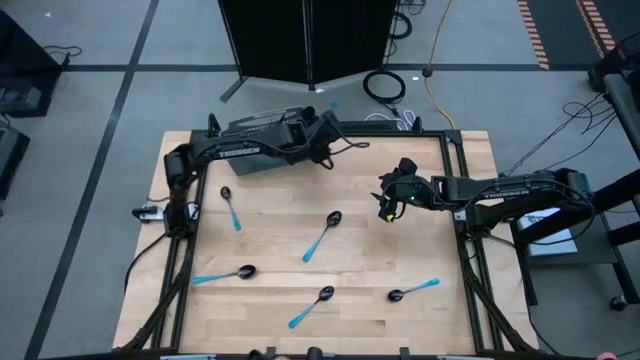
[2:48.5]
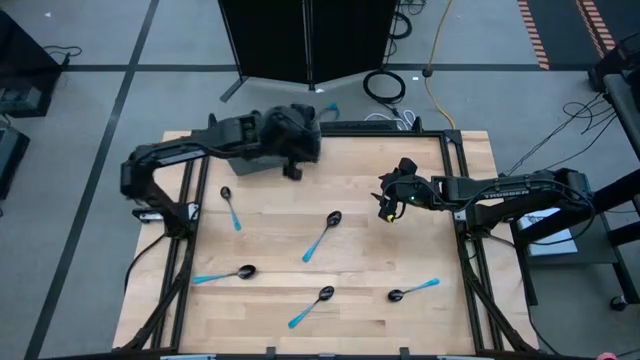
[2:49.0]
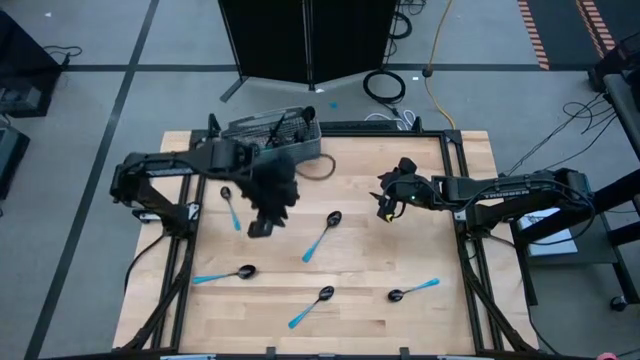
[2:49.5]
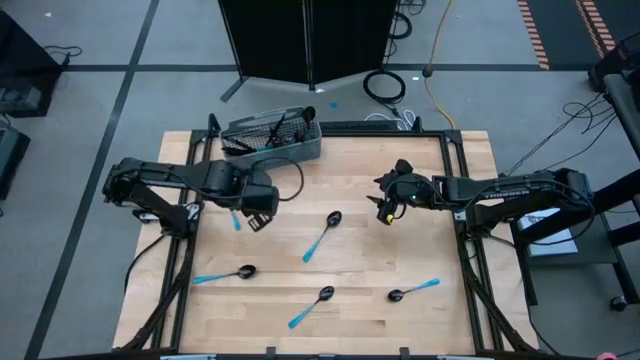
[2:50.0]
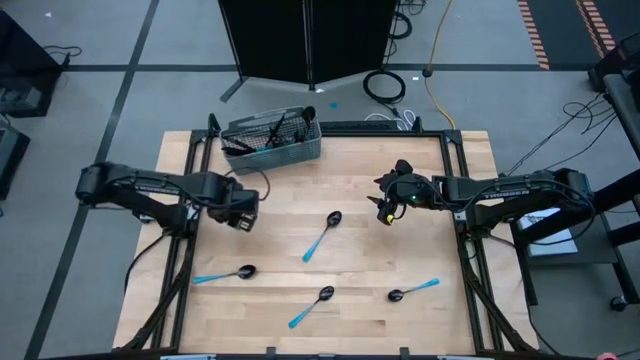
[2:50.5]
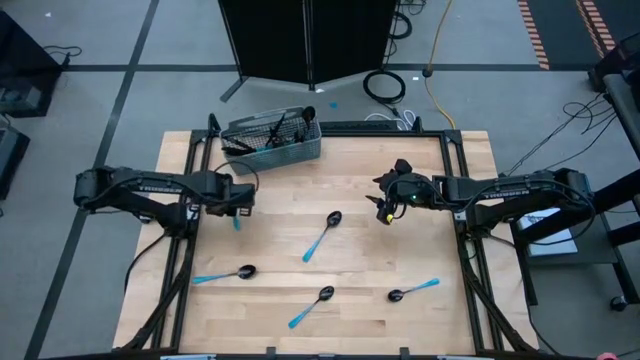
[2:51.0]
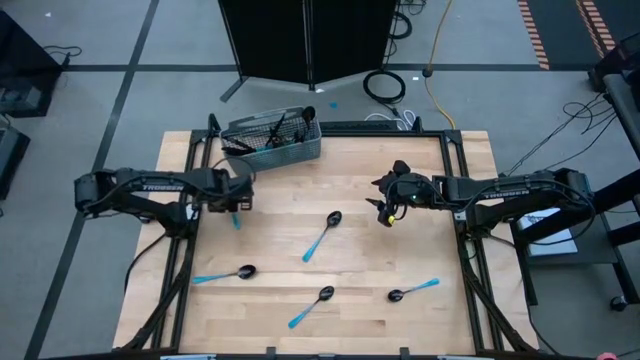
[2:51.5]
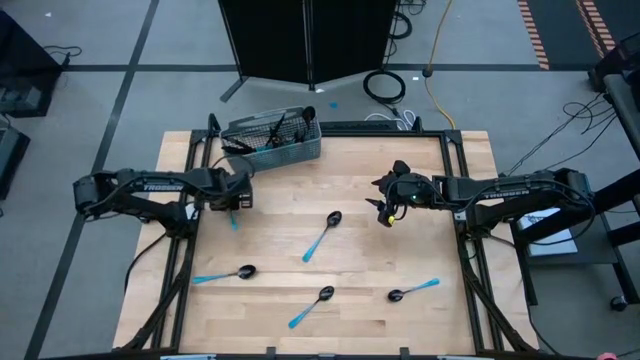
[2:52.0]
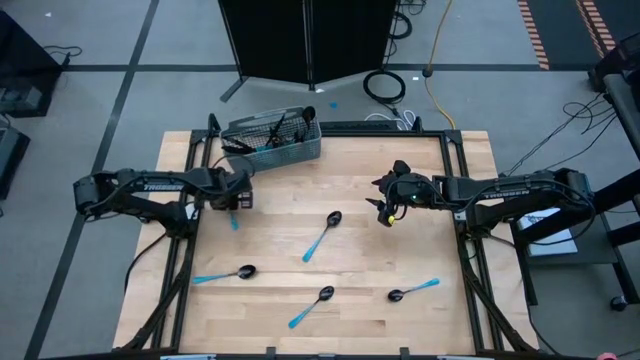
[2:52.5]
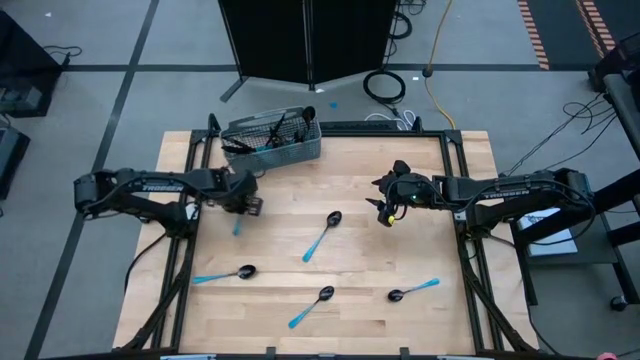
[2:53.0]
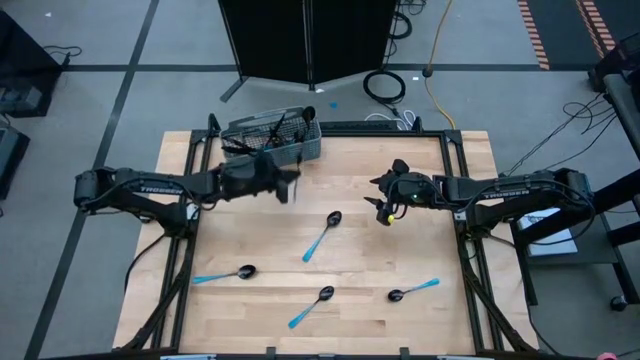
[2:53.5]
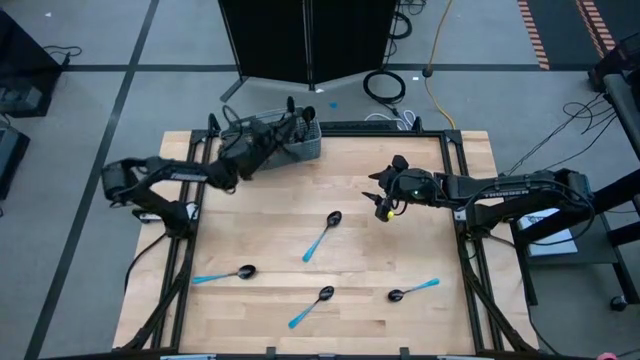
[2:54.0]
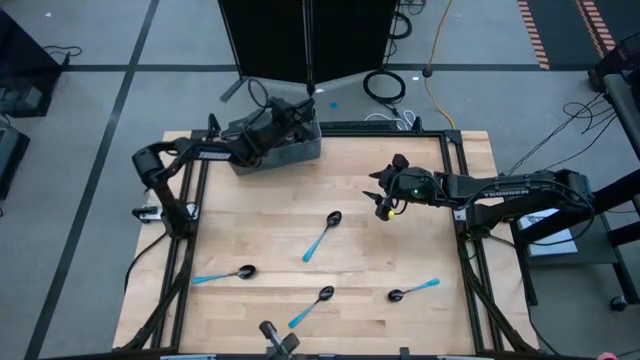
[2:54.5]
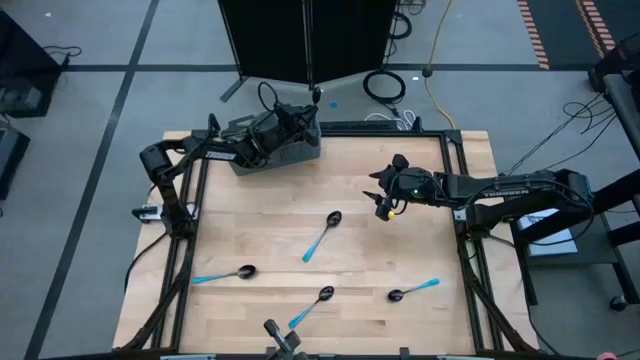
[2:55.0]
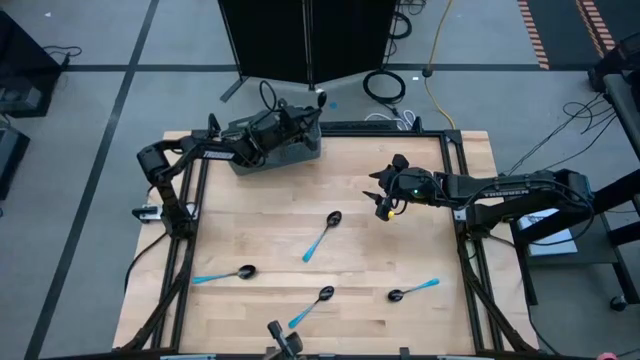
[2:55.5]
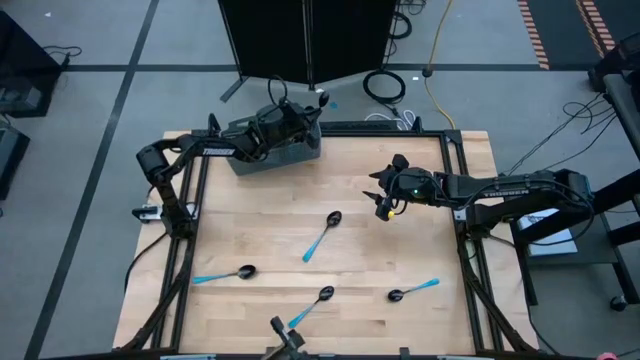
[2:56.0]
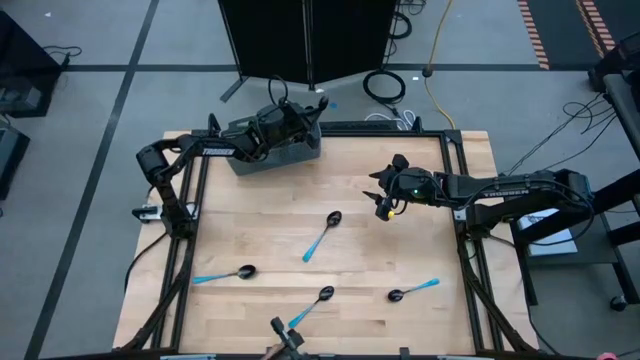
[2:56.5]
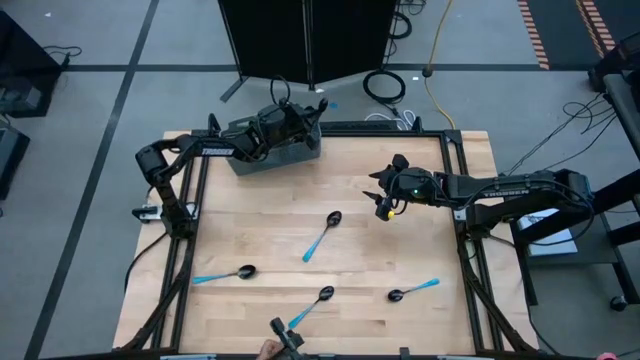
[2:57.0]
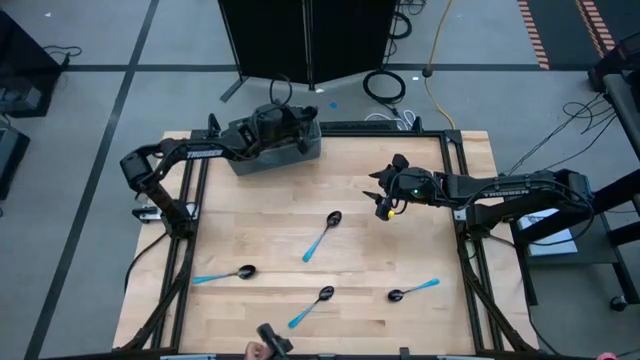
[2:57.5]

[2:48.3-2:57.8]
Task: Sort silverware
Put the blue spoon into the silverware basket

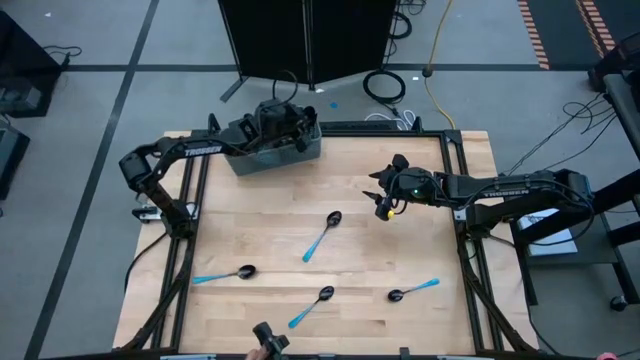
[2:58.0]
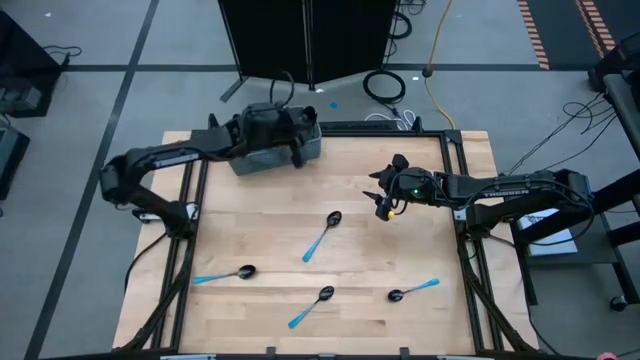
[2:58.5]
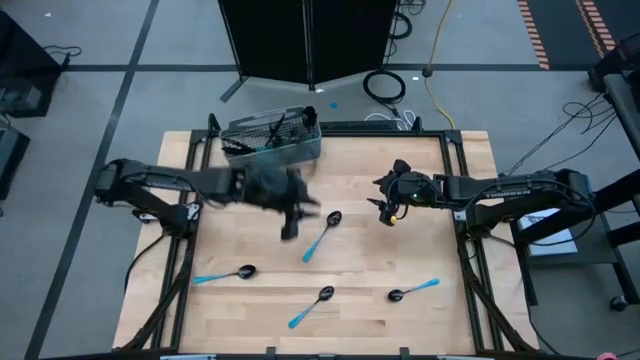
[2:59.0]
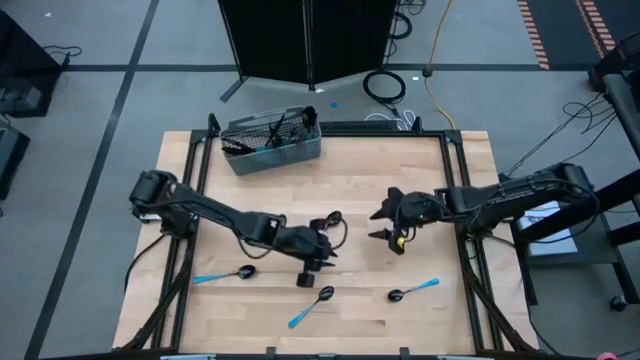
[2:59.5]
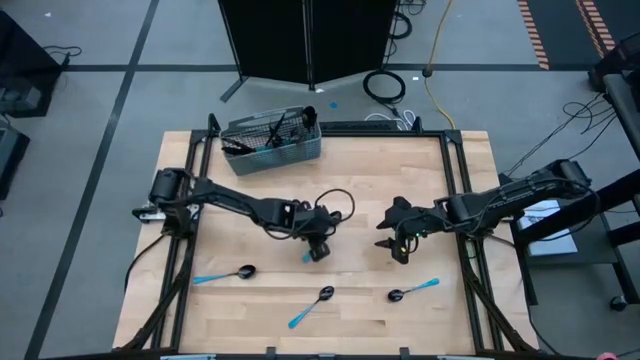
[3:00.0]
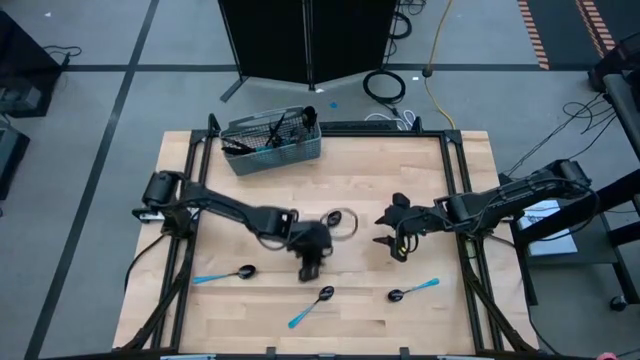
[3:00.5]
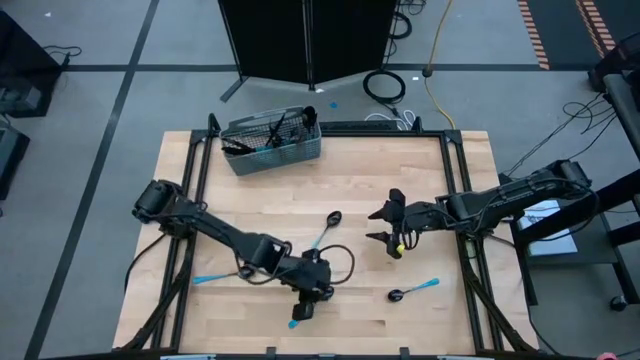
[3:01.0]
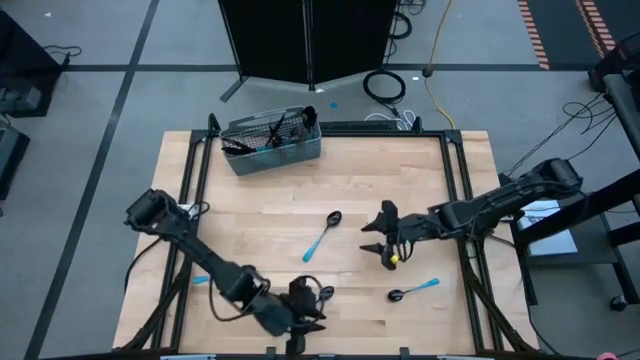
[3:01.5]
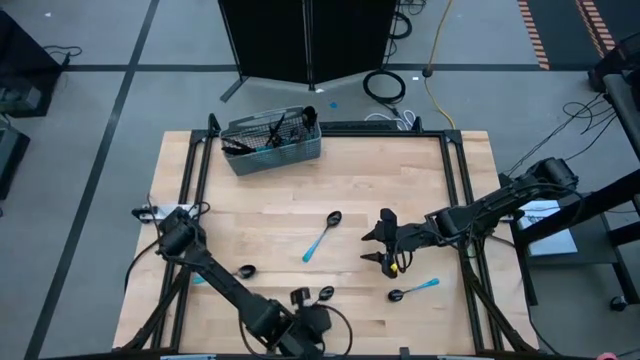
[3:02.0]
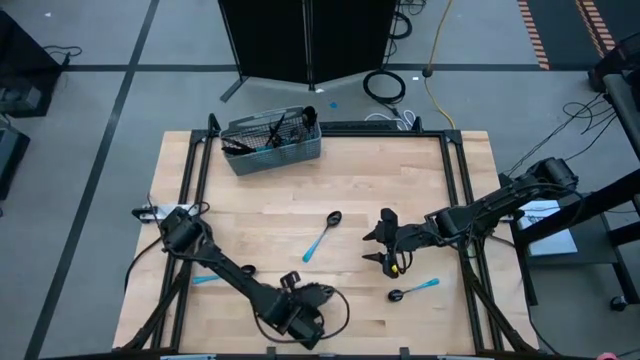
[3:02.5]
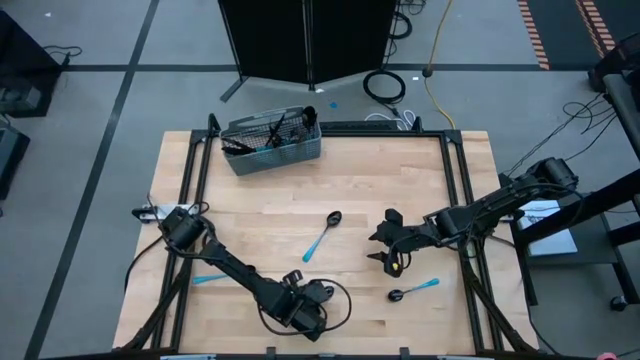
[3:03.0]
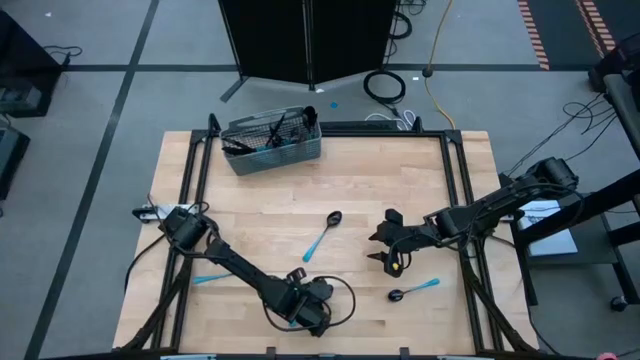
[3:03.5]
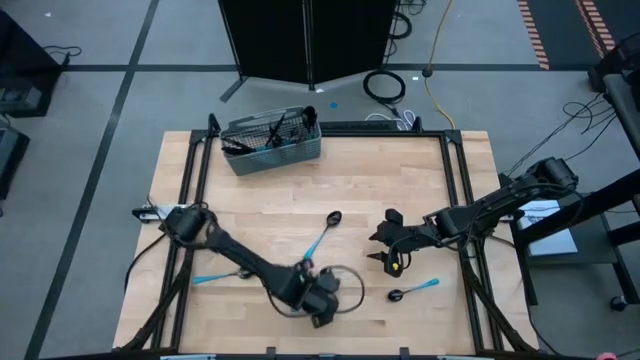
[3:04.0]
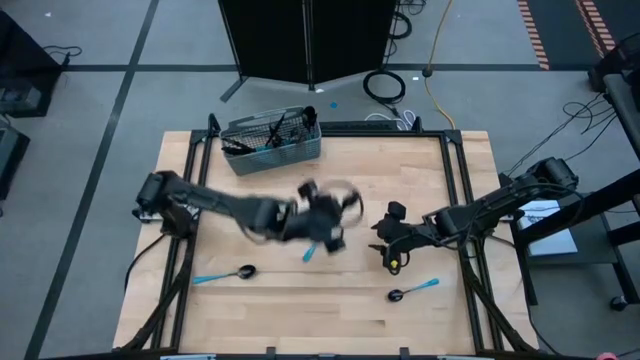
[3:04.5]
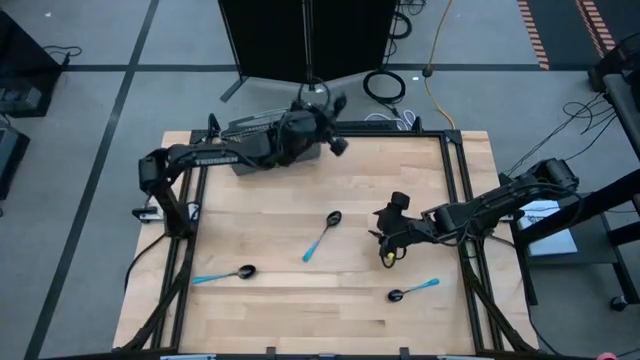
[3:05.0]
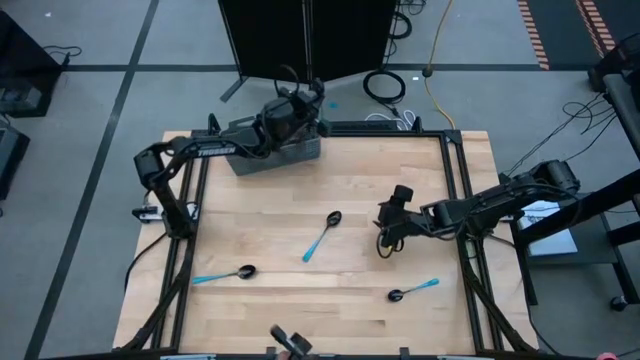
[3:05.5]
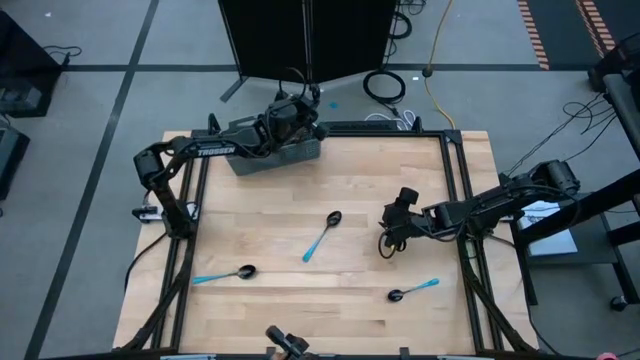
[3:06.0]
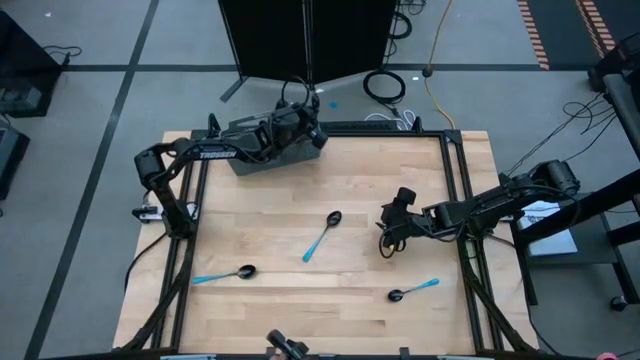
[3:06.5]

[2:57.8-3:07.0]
Put the blue spoon into the silverware basket

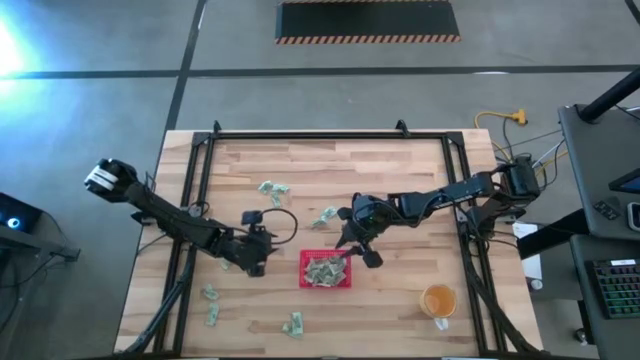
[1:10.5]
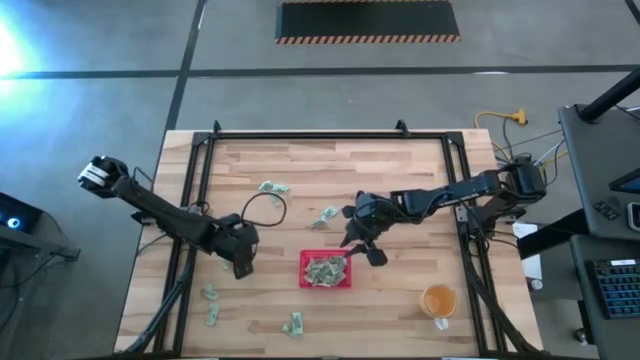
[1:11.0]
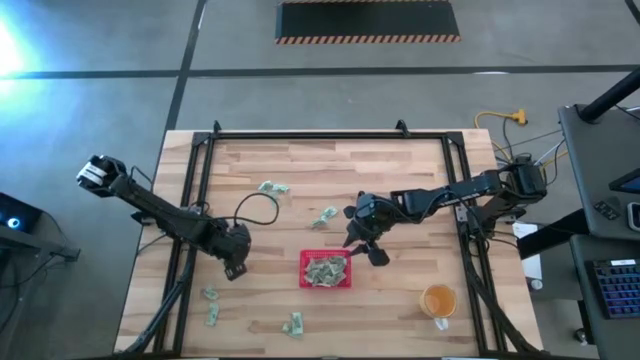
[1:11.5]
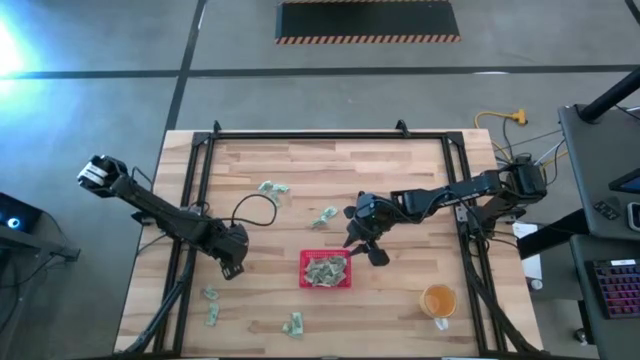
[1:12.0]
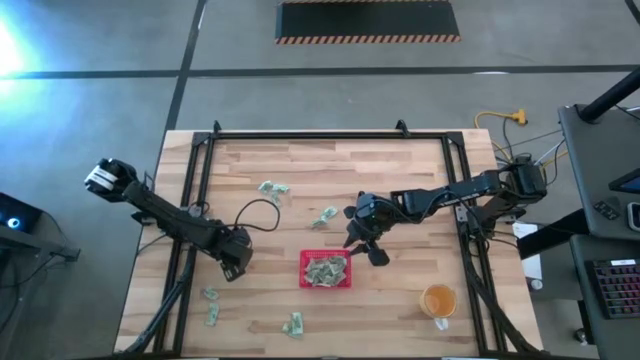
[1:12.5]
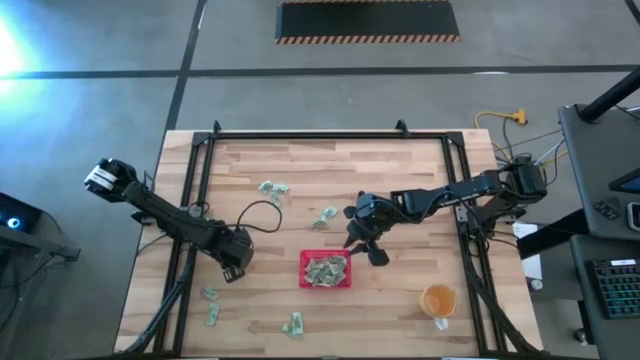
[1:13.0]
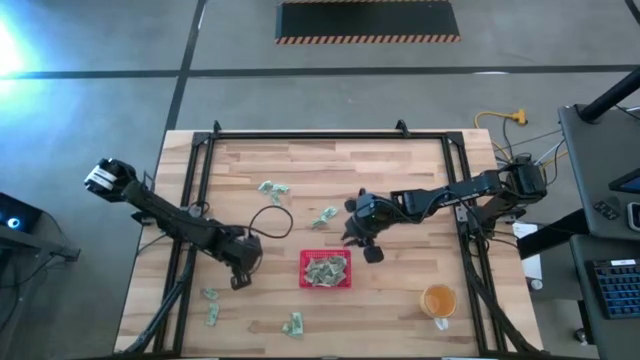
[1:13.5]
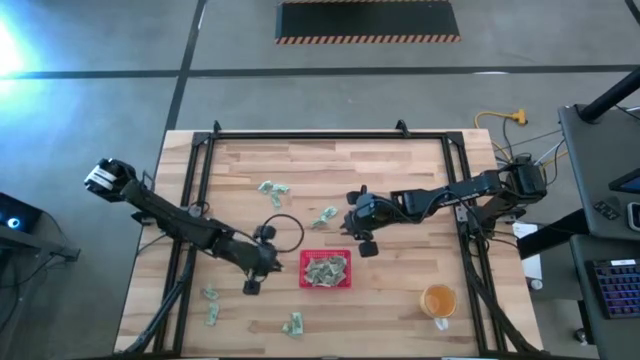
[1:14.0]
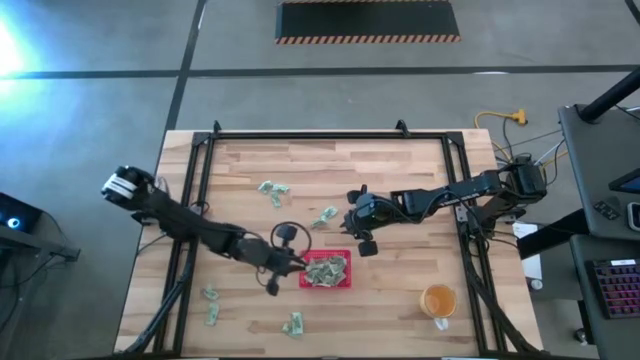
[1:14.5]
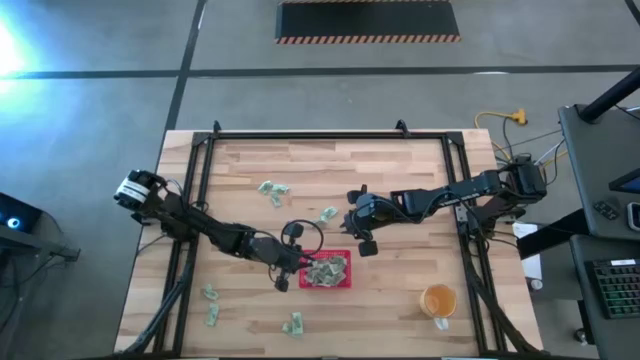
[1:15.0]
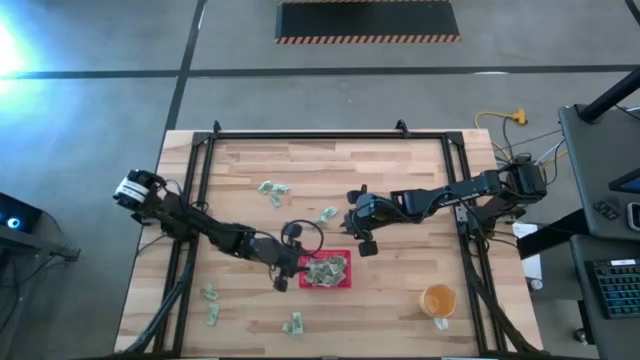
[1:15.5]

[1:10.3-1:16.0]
Task: Pick and place Stevia / Truvia into bins
Put the white stevia packet into the red bin
